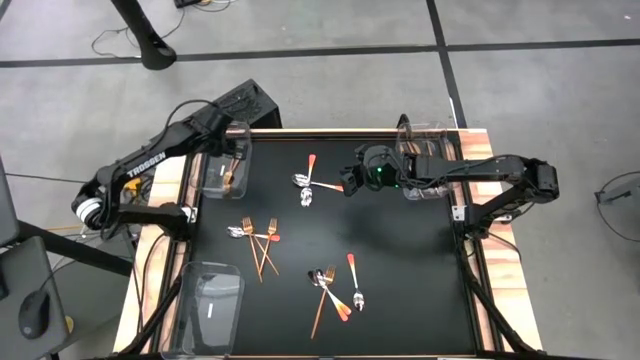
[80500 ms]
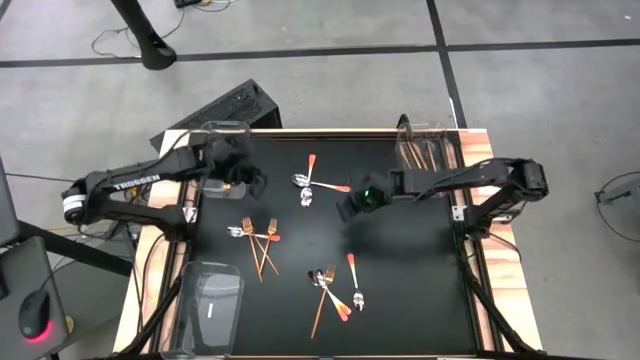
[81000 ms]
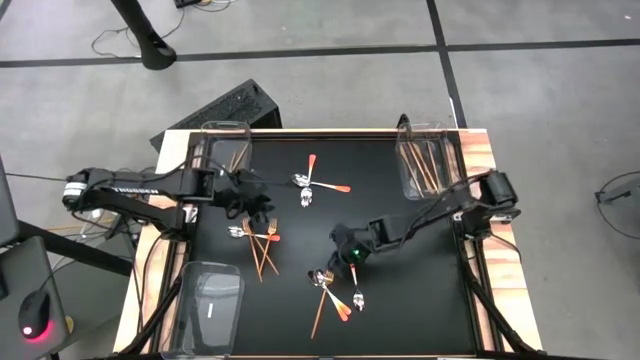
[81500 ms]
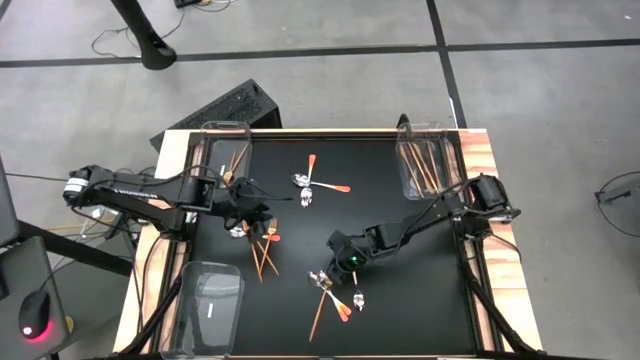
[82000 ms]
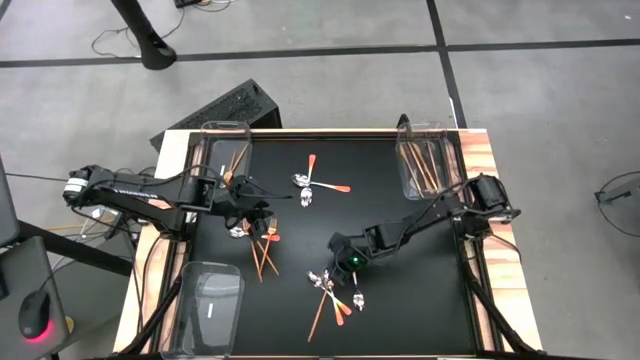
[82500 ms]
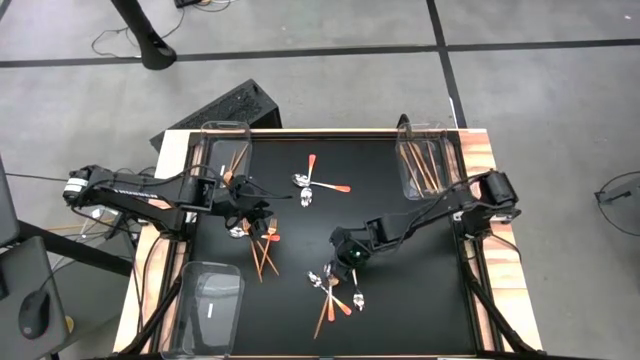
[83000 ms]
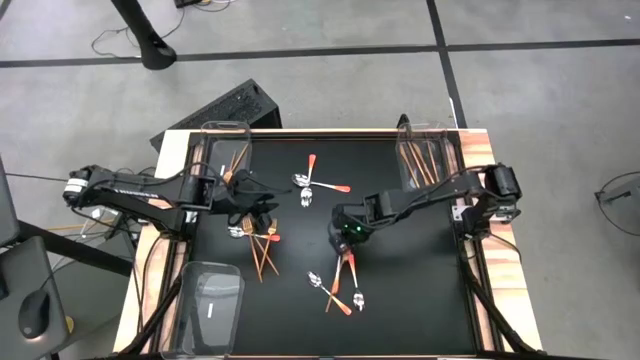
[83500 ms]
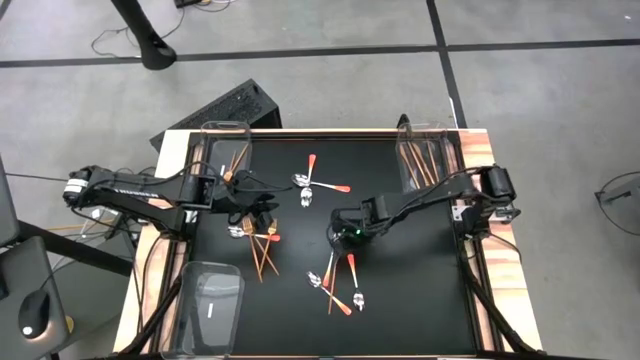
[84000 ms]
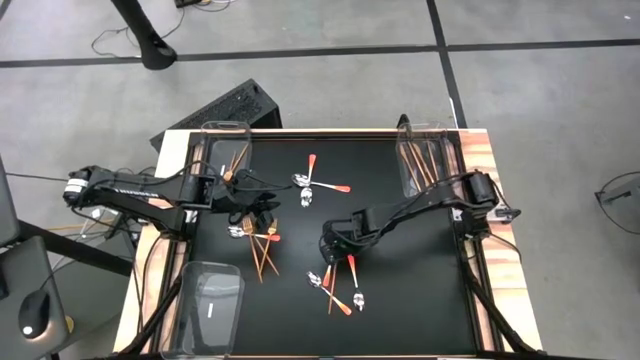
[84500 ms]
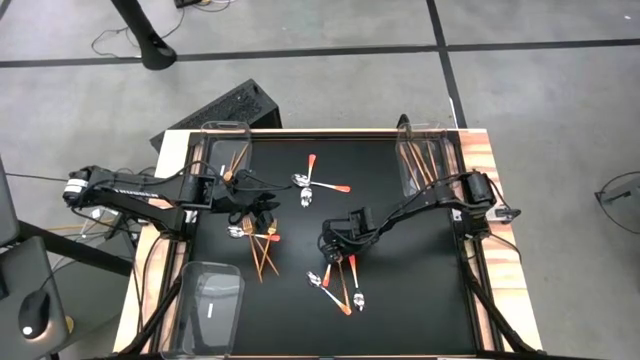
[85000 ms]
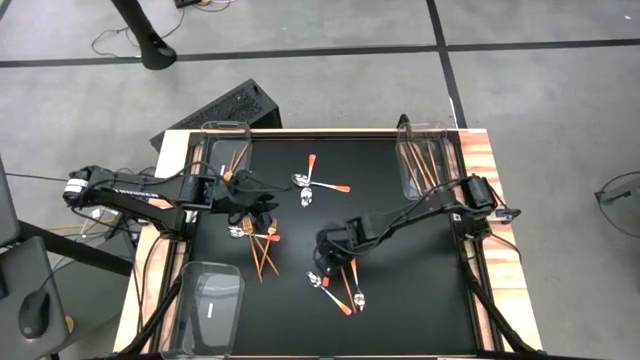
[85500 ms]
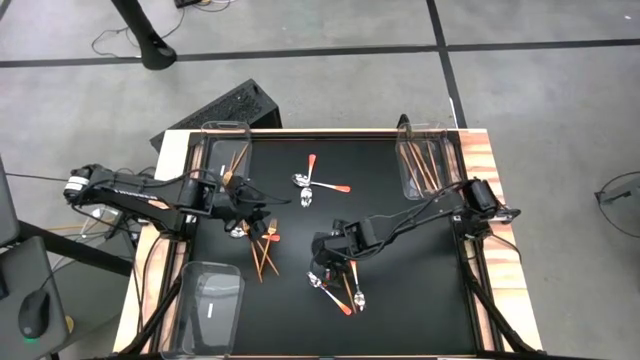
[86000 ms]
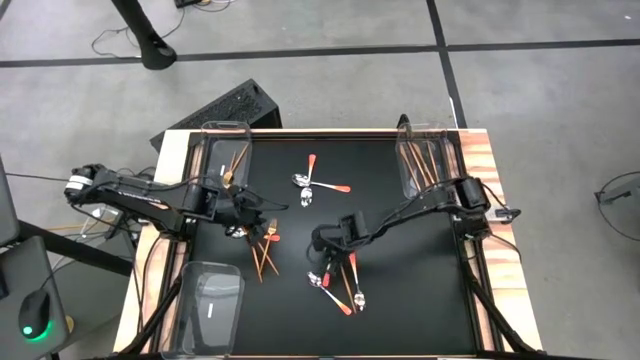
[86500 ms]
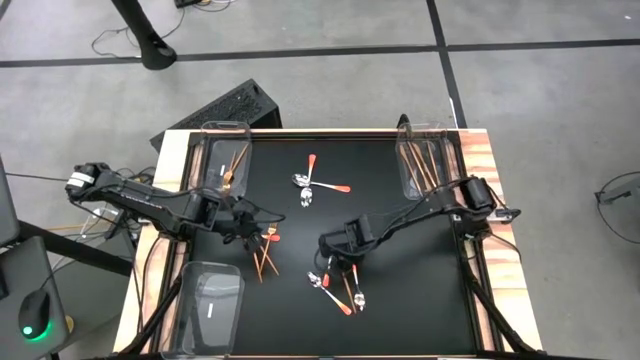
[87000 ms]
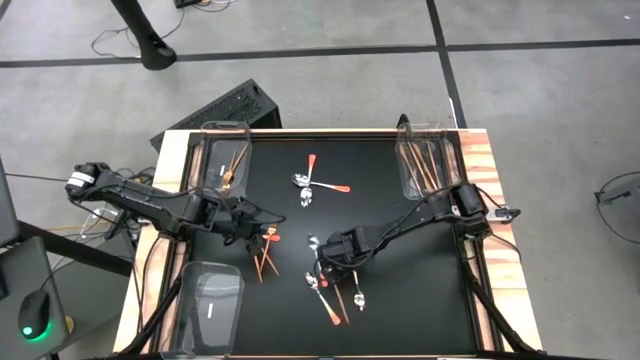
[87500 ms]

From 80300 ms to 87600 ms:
Task: Sort silverware by color (type)
Put the gold fork into the top left transparent bin

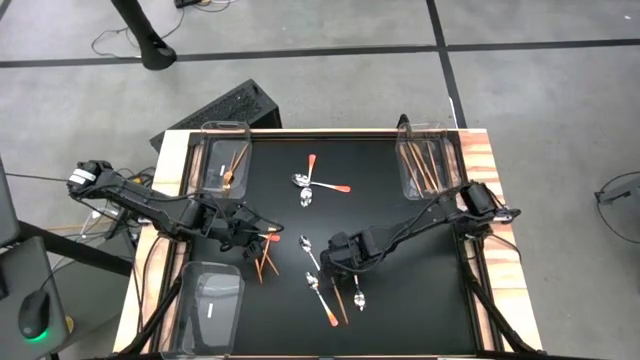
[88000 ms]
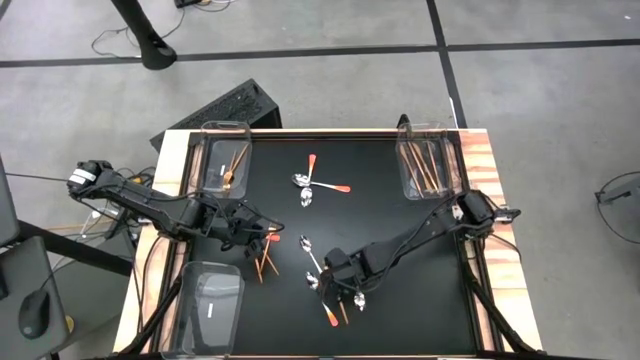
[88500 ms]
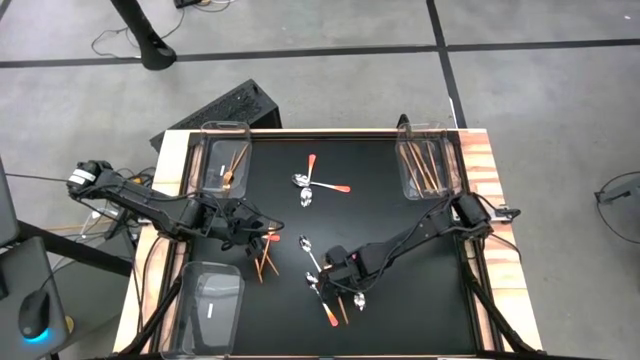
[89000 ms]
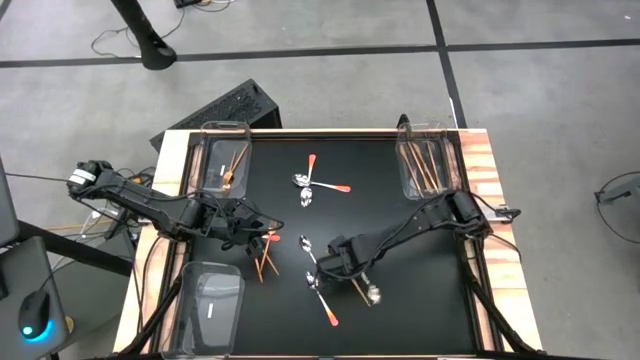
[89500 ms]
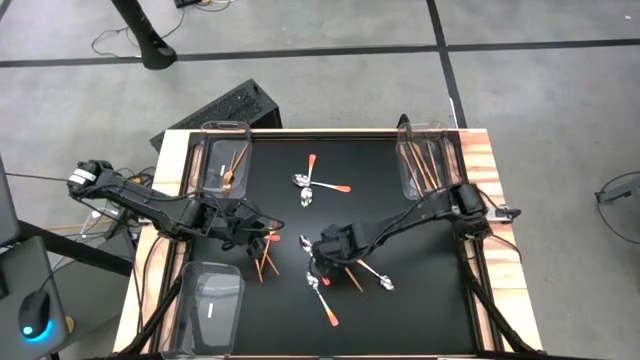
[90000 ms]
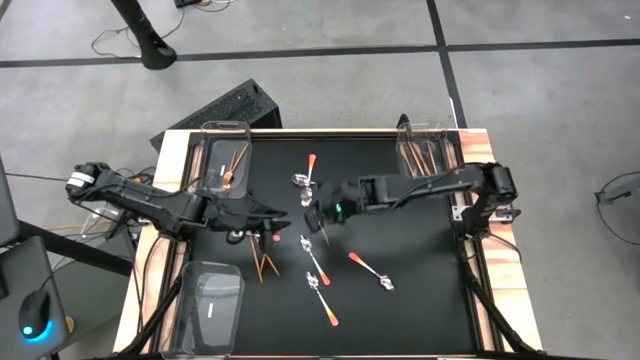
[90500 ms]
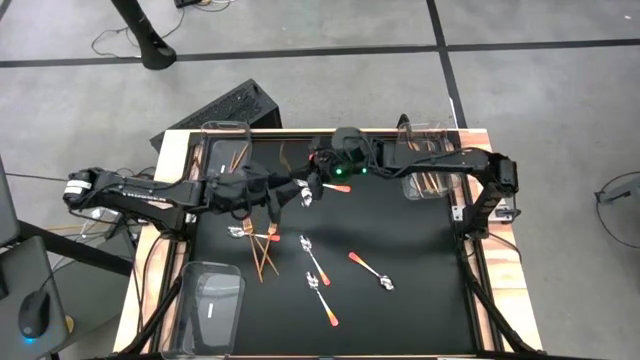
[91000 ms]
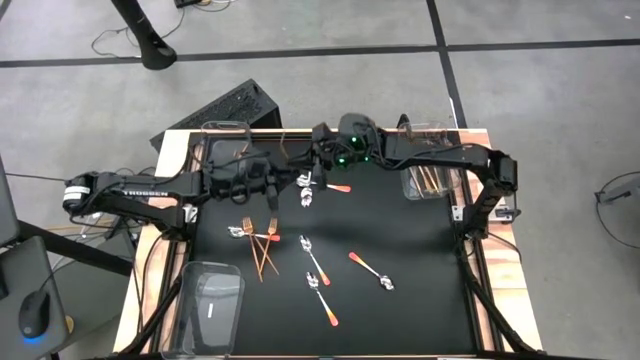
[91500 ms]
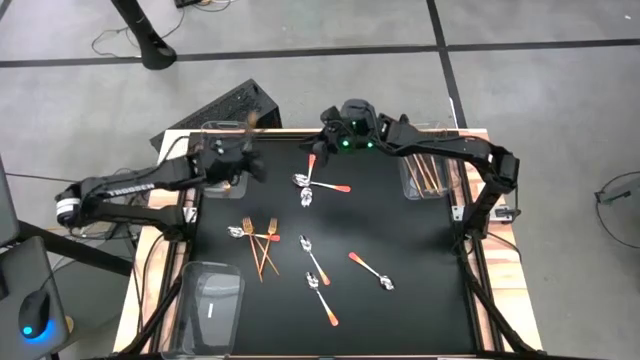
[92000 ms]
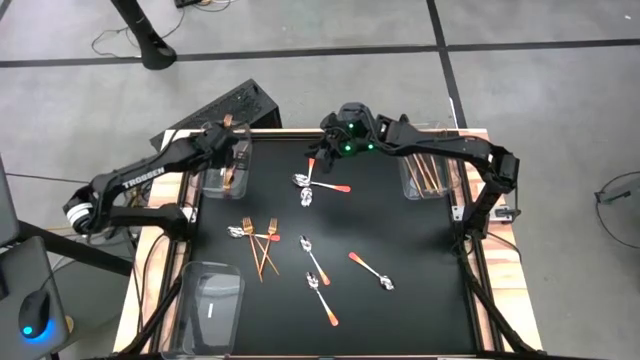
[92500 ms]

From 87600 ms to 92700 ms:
Put the gold fork into the top left transparent bin

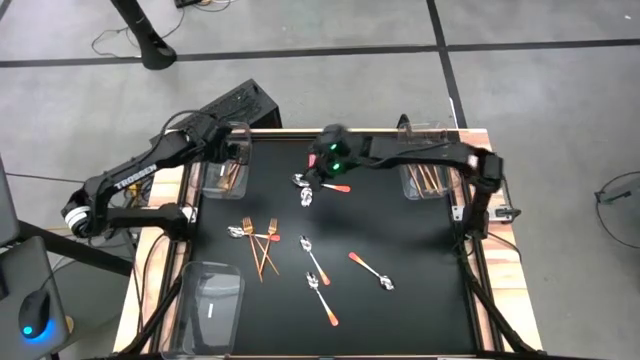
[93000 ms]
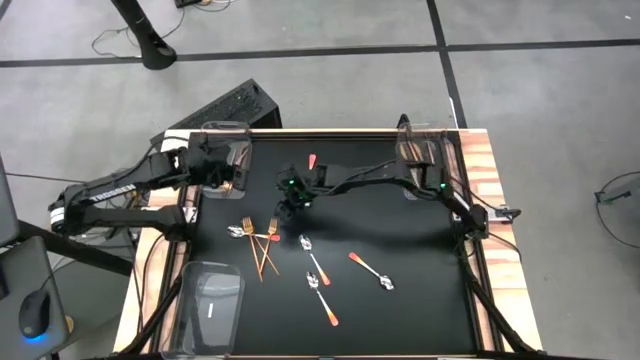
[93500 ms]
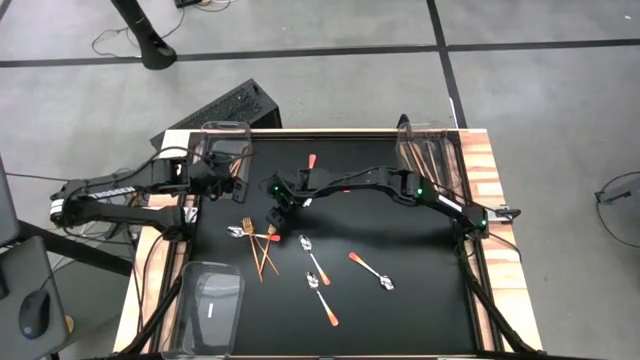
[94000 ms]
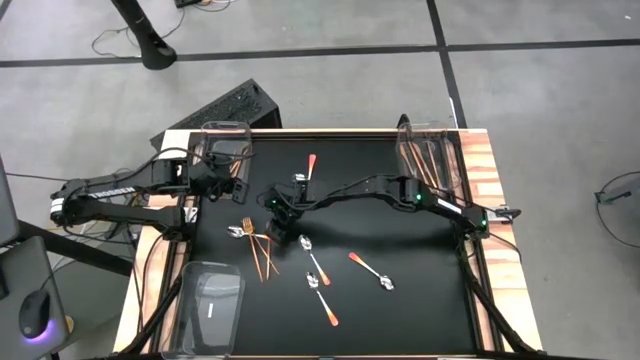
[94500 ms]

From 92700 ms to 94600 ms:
Put the gold fork into the top left transparent bin

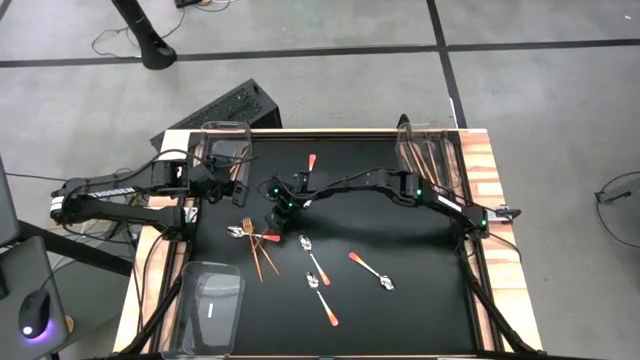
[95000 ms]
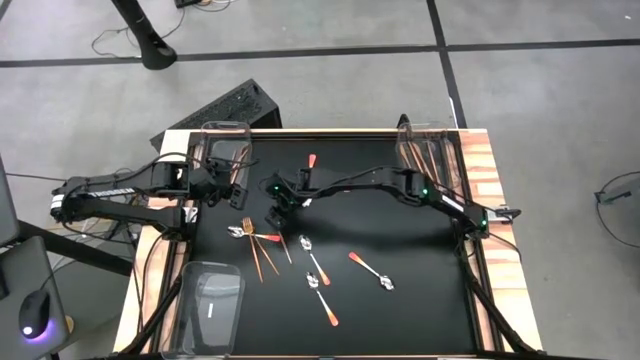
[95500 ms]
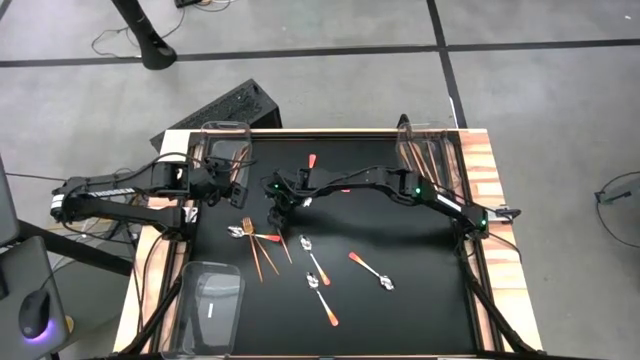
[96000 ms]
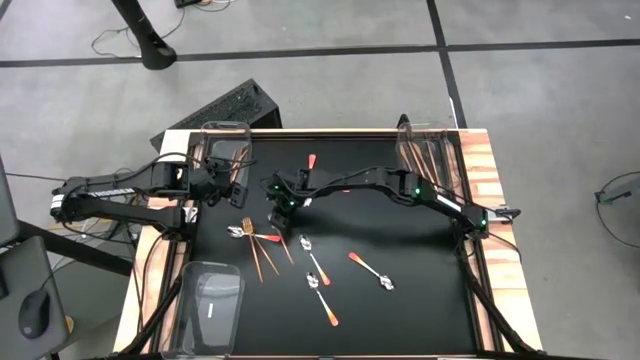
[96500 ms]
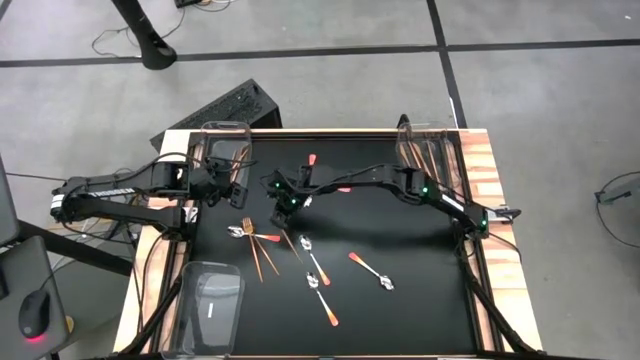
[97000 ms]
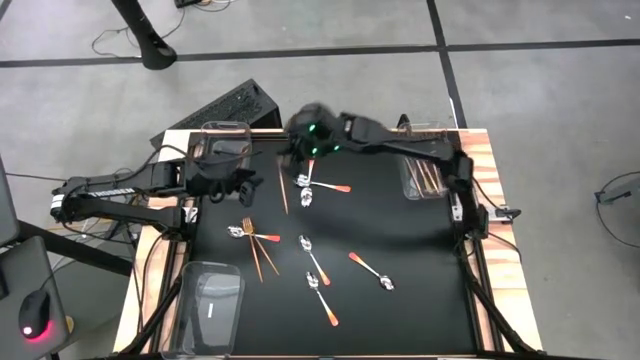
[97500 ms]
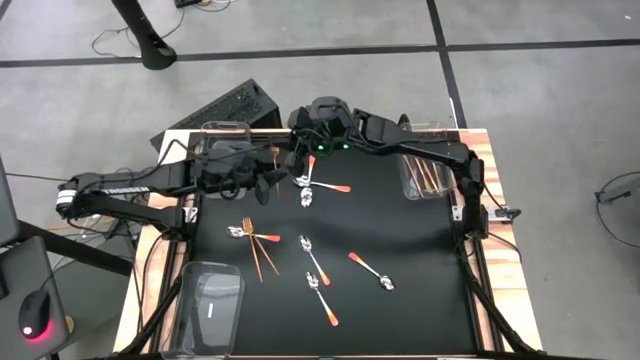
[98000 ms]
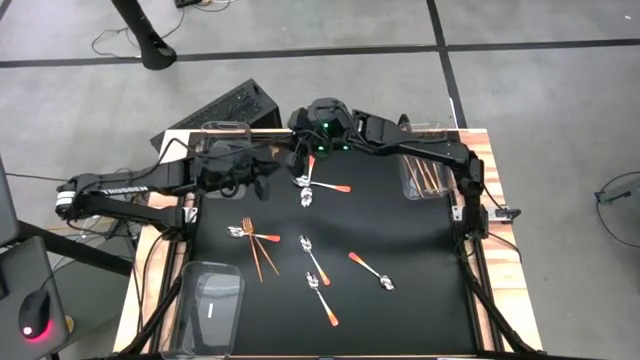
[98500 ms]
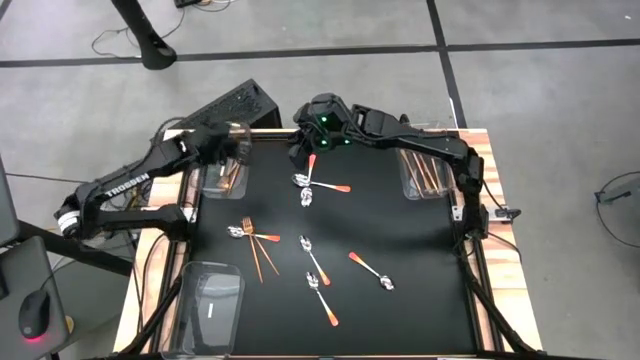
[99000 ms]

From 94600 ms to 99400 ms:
Put the gold fork into the top left transparent bin

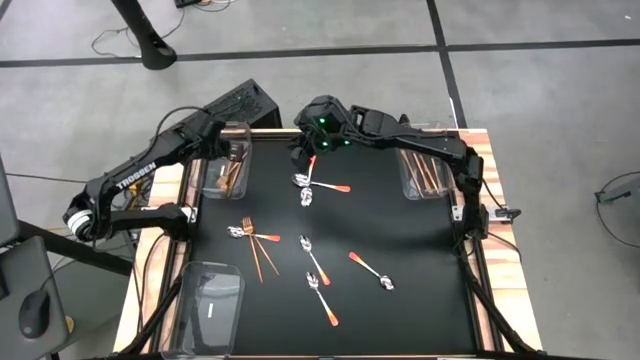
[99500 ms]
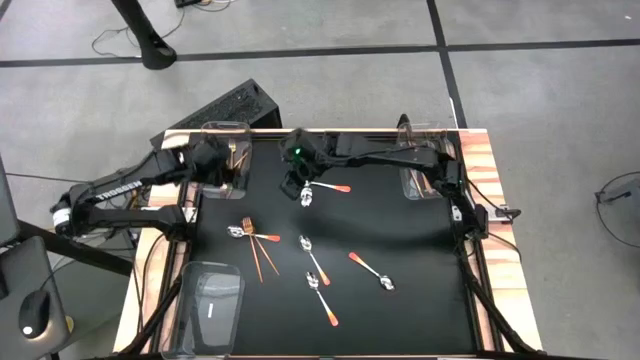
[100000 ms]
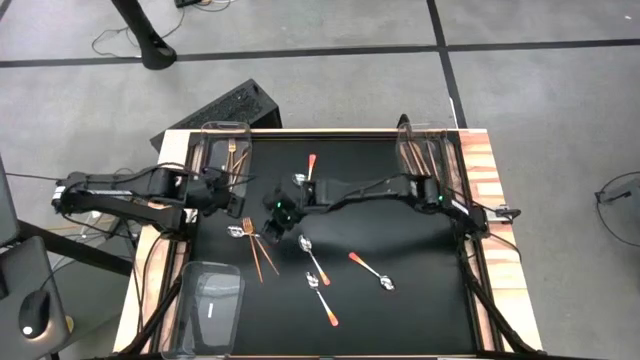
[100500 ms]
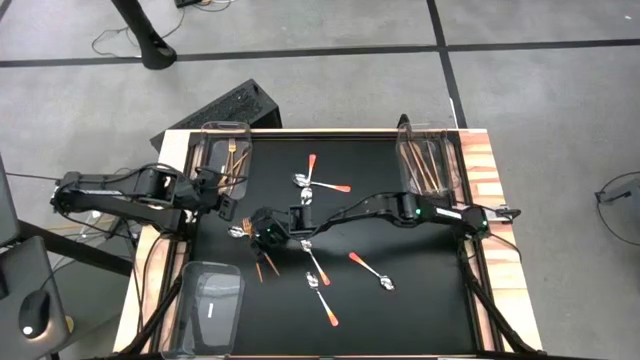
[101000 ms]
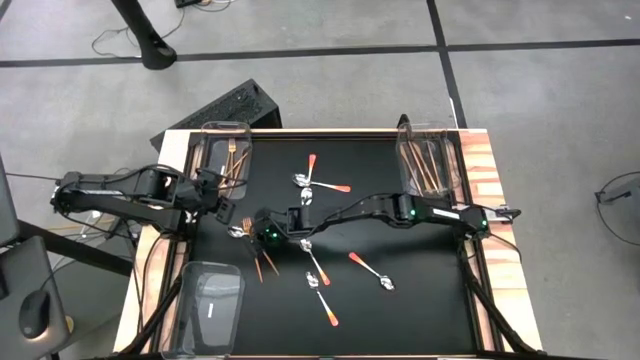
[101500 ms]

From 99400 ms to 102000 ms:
Adjust the gold fork on the table
